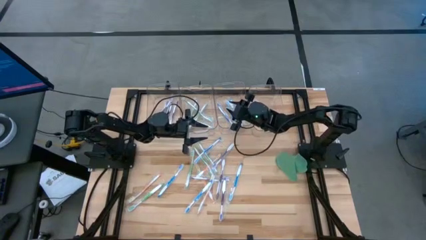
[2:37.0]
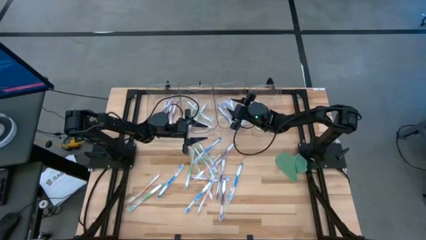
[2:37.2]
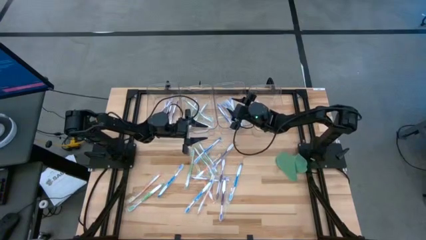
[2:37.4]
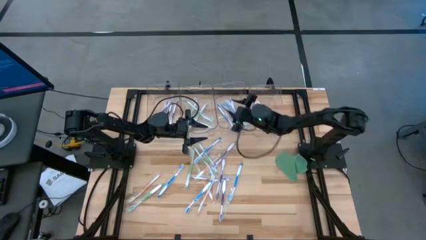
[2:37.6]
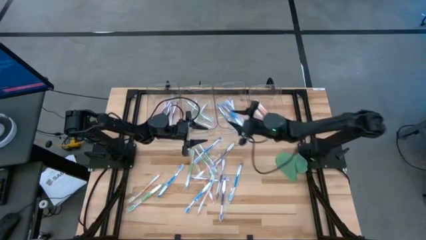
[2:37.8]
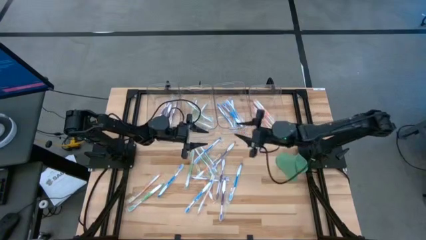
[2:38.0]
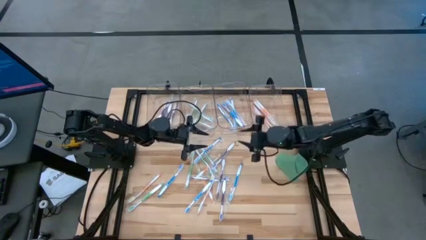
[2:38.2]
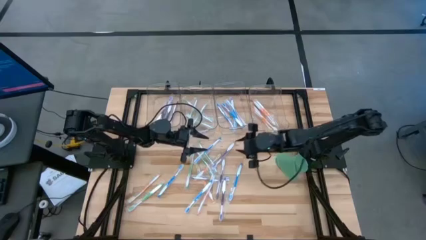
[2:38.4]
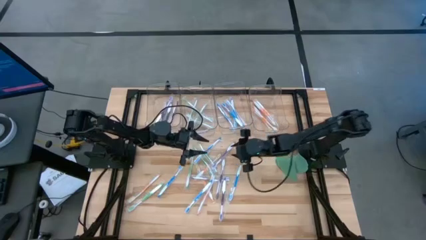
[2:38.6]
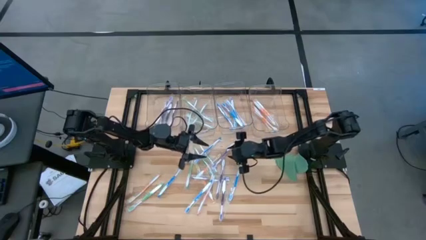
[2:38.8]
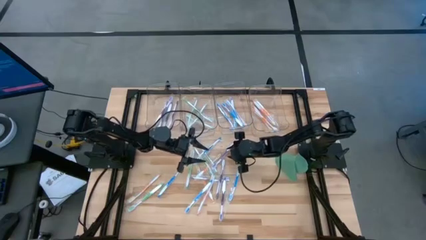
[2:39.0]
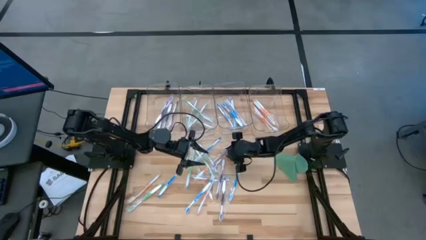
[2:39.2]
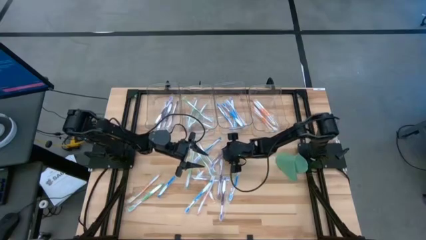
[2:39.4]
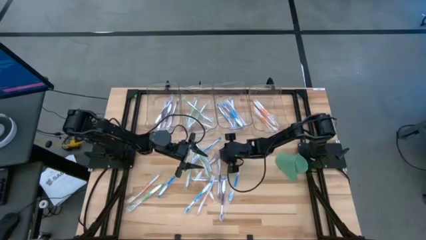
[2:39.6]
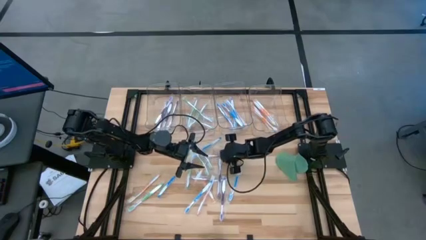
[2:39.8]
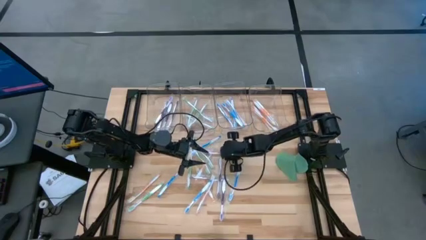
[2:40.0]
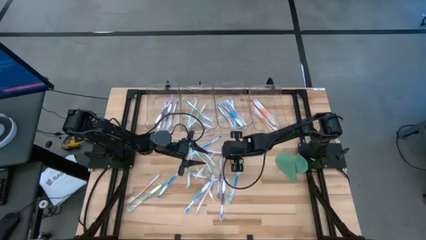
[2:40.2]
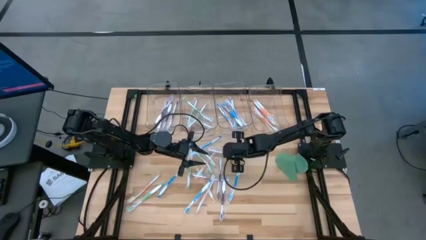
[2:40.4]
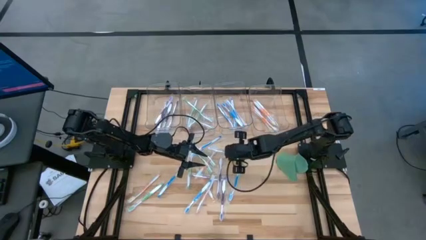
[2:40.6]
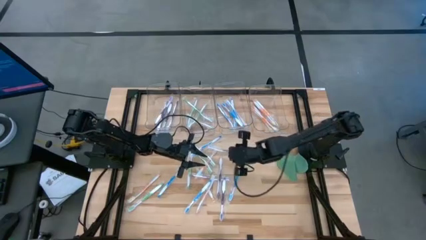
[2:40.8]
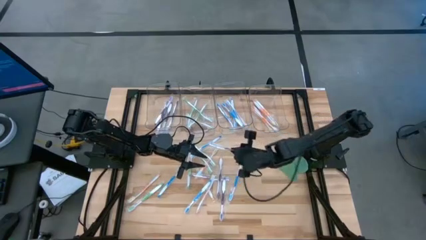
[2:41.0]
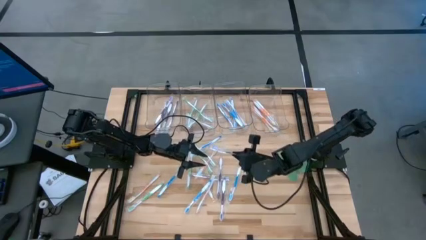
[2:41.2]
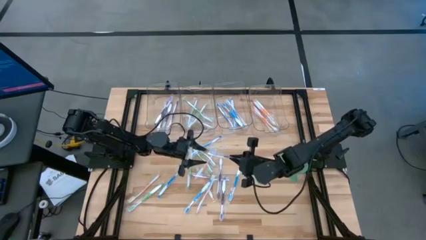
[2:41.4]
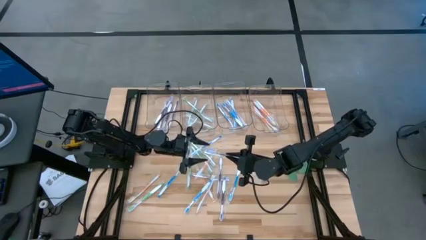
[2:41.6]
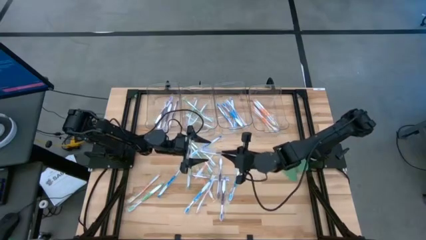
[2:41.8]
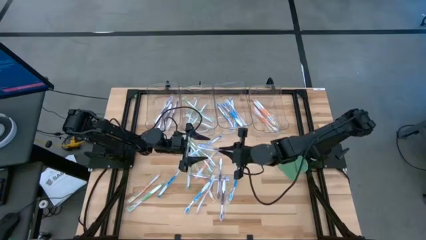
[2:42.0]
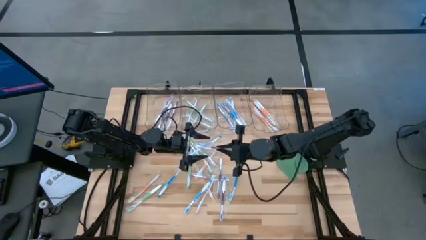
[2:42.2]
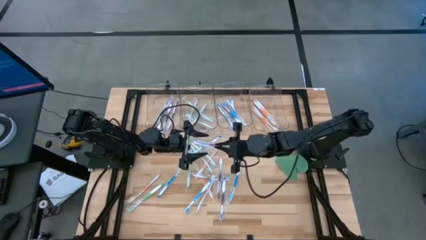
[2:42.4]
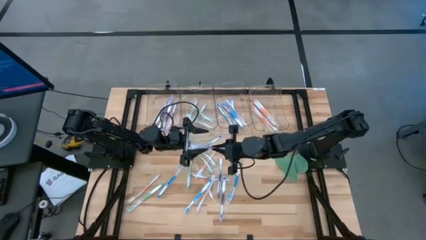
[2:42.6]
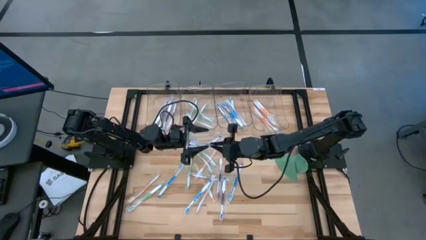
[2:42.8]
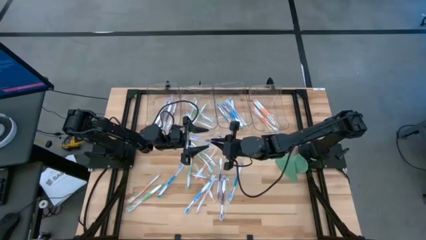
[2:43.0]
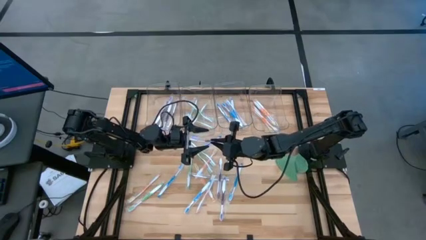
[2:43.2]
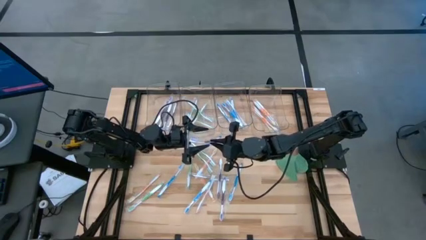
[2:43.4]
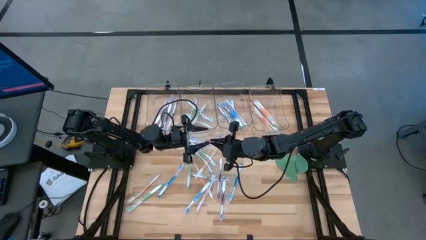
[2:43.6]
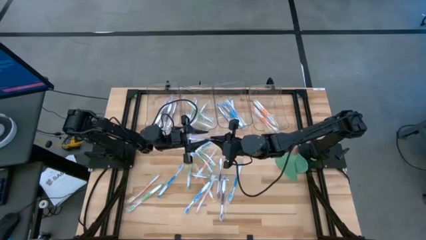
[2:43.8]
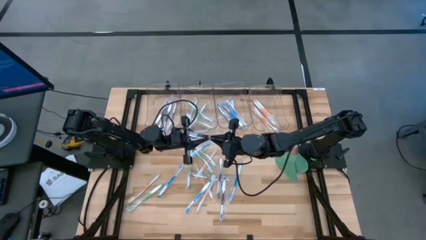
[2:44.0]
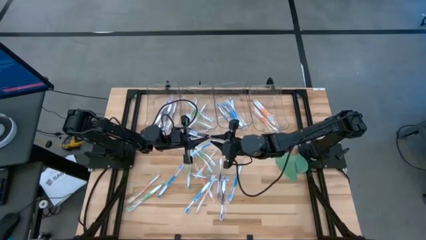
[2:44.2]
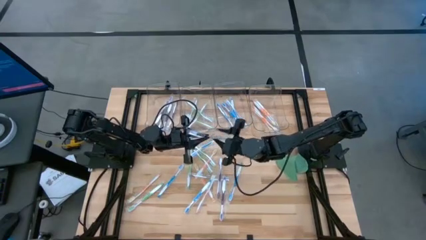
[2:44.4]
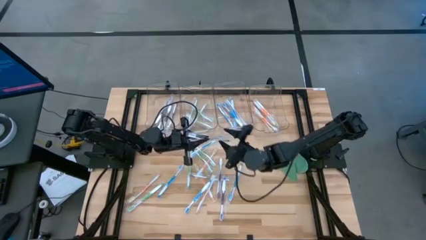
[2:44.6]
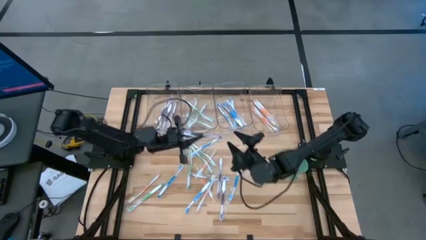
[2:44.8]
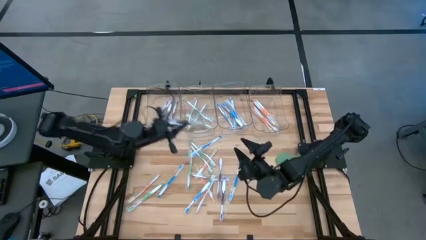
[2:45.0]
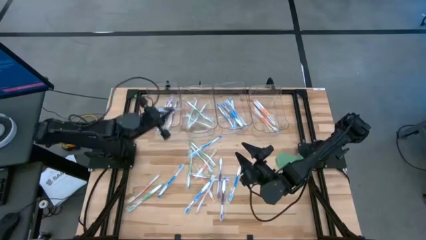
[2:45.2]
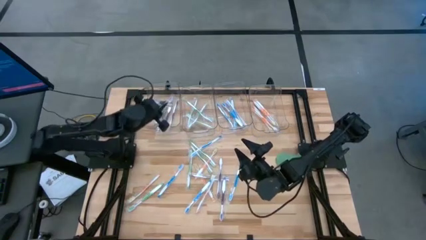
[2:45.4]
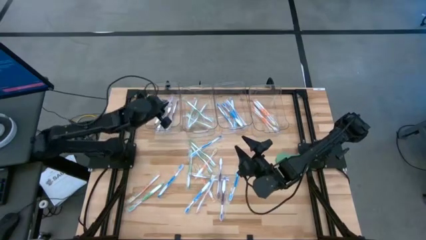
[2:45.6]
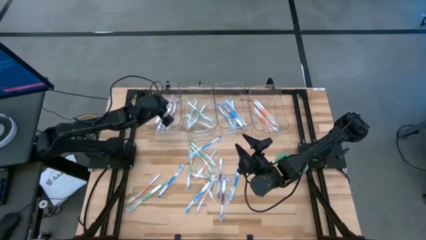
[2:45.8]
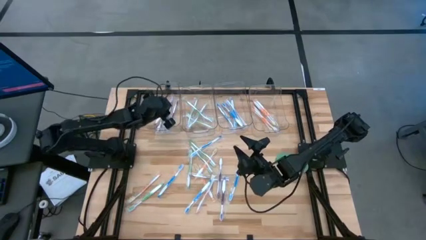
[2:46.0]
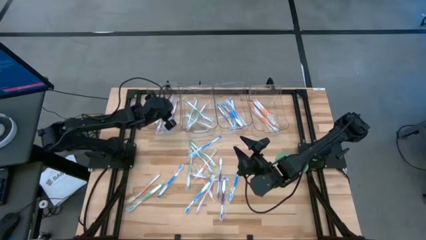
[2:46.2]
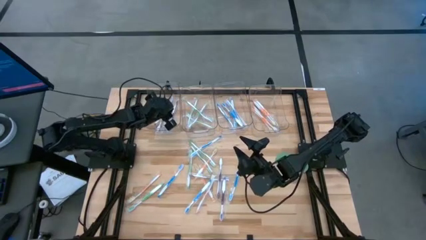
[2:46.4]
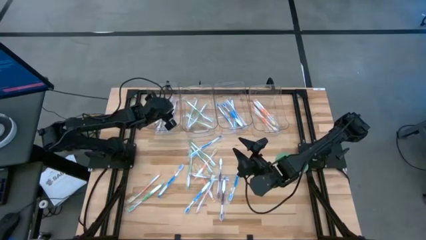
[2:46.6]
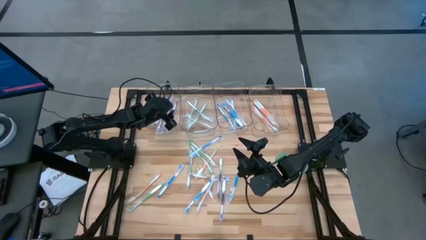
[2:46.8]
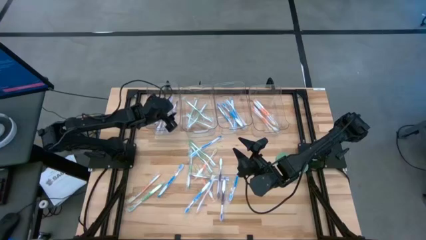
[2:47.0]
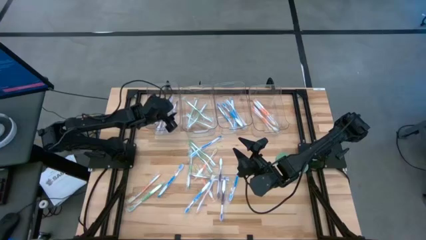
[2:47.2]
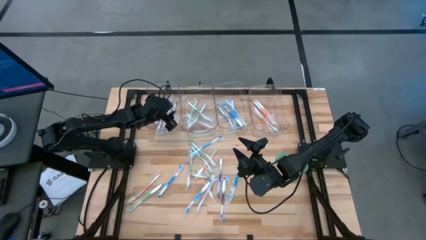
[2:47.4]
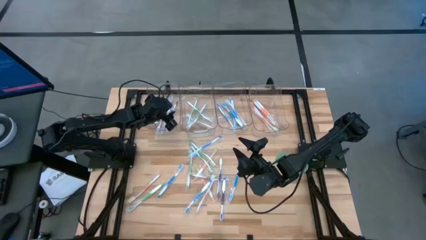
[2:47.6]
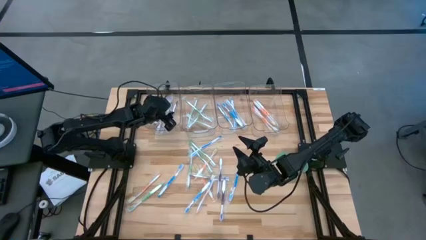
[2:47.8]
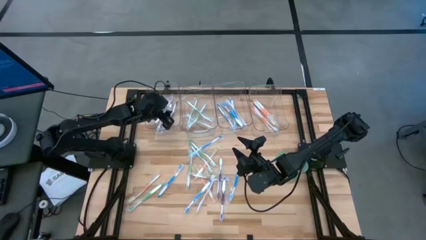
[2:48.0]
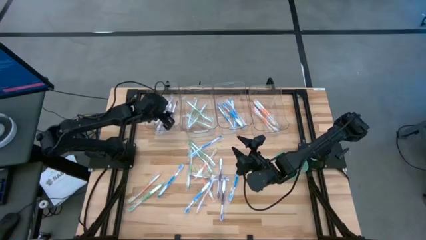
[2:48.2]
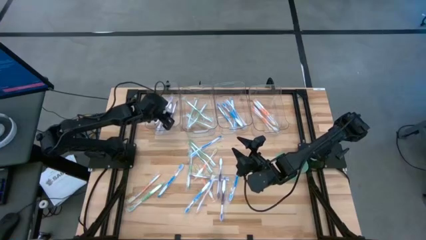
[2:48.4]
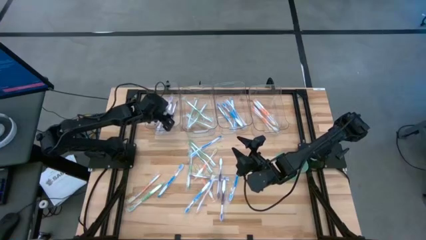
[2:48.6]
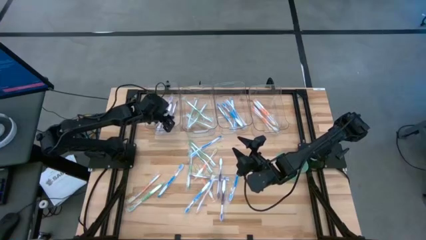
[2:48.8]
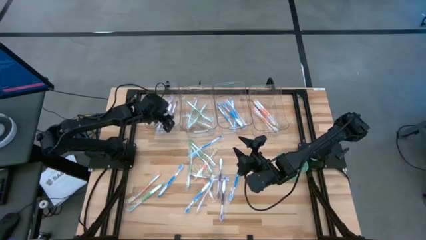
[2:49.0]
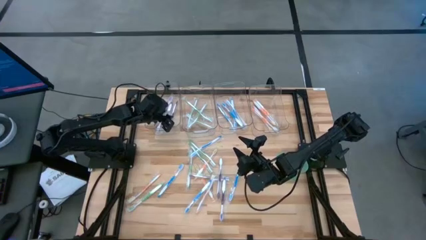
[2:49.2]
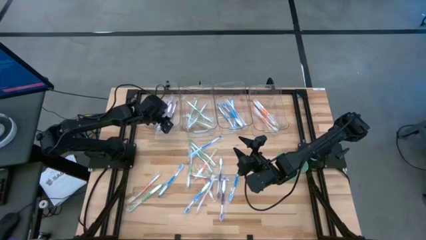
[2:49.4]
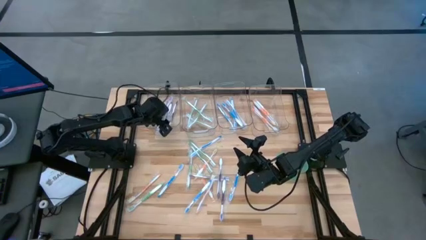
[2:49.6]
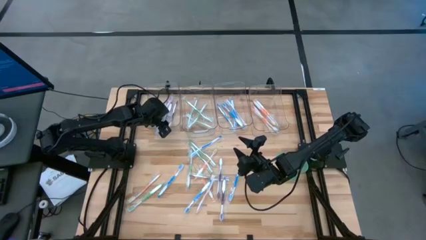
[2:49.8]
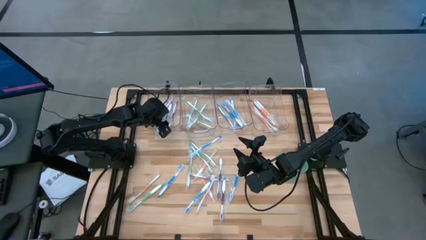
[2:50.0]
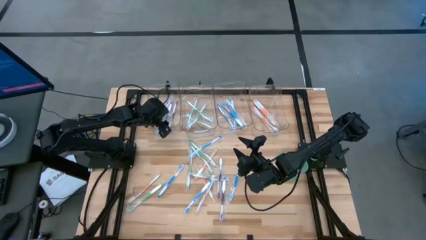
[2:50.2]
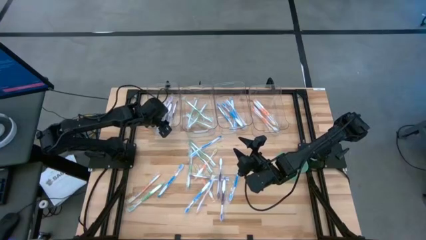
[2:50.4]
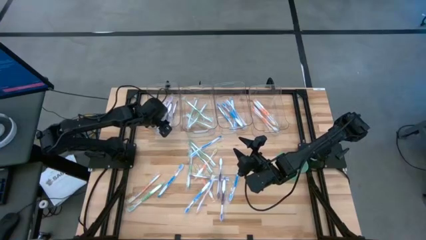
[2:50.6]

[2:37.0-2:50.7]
Task: Pick & Place Toothbrushes
Put the purple toothbrush into the left transparent bin

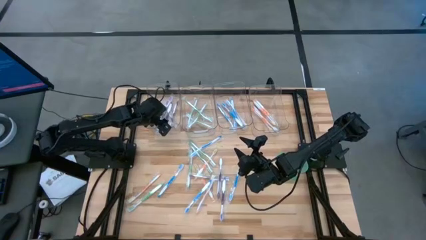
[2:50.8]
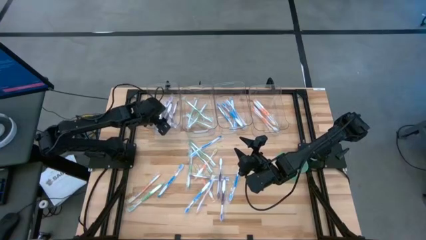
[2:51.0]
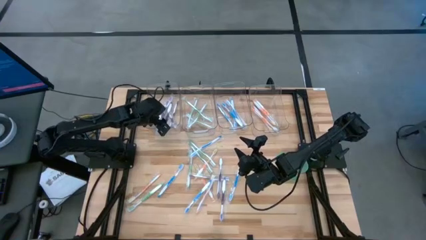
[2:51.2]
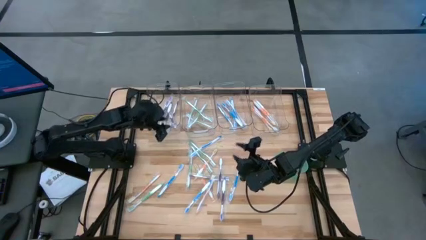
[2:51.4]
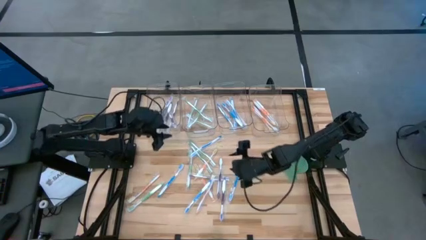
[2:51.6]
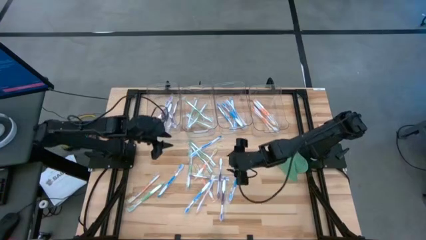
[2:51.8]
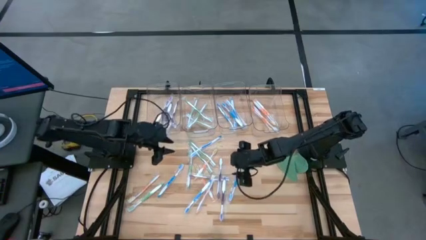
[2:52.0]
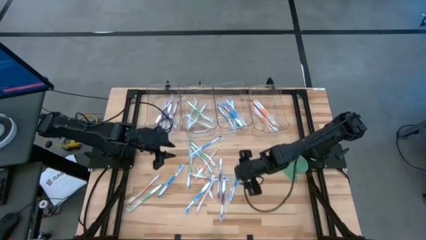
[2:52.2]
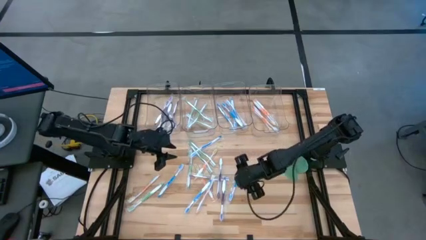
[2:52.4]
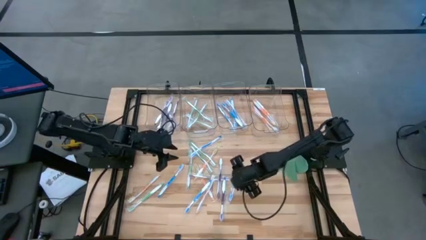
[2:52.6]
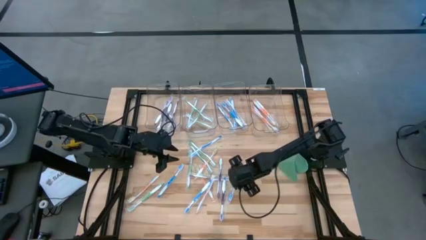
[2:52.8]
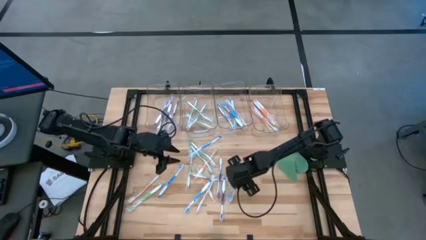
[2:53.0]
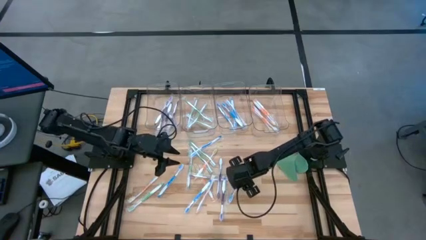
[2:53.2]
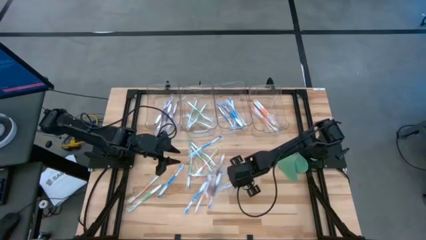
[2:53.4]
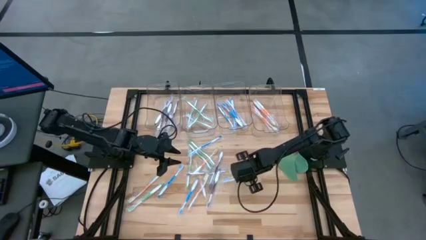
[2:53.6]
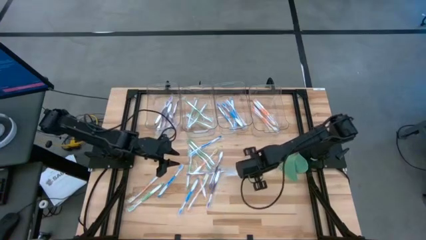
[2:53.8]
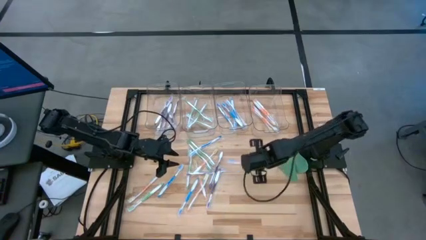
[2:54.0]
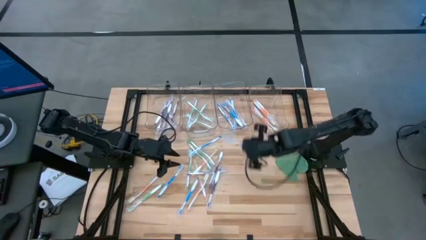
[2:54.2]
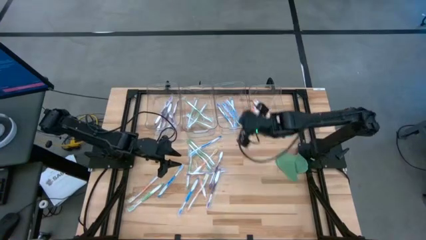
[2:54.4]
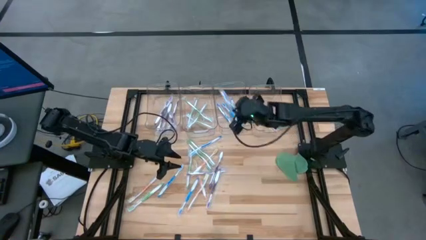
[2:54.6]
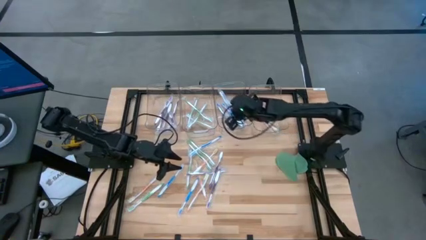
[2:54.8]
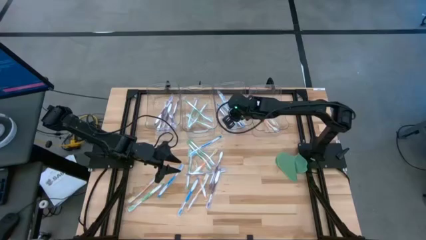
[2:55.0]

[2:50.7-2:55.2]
Put the blue toothbrush into the middle right transparent bin
